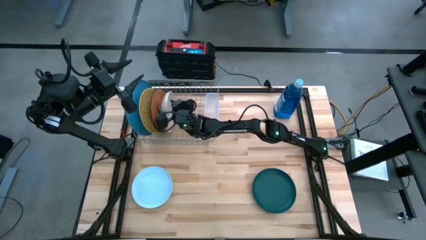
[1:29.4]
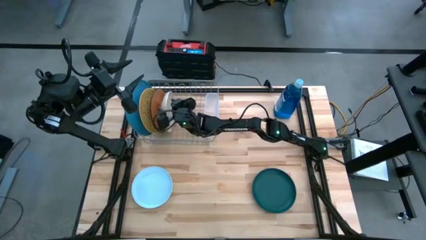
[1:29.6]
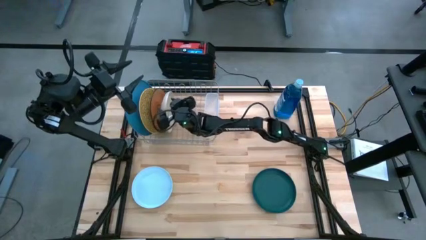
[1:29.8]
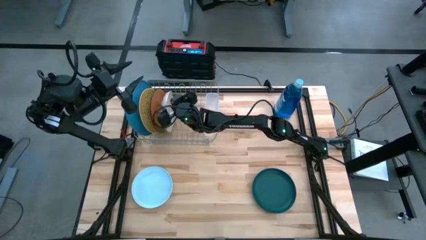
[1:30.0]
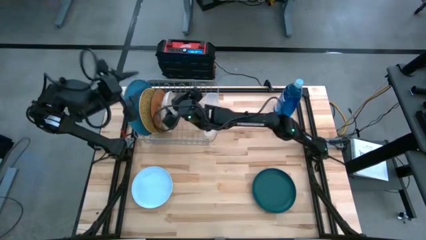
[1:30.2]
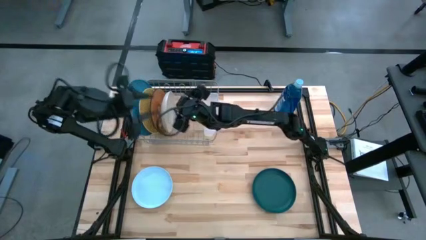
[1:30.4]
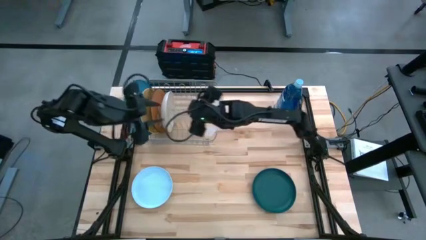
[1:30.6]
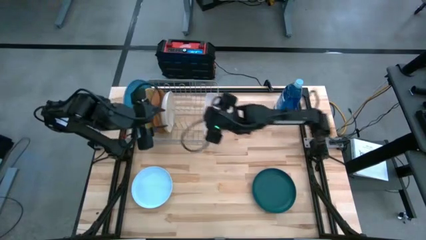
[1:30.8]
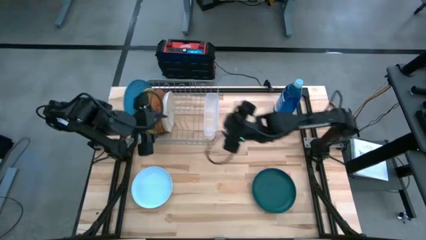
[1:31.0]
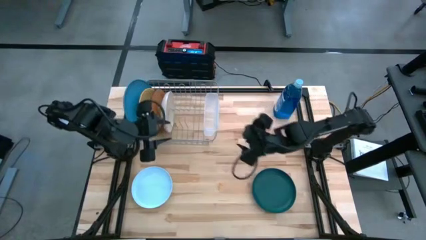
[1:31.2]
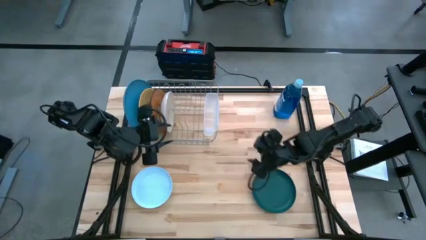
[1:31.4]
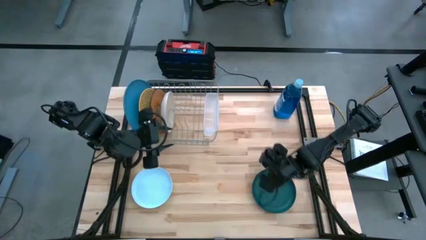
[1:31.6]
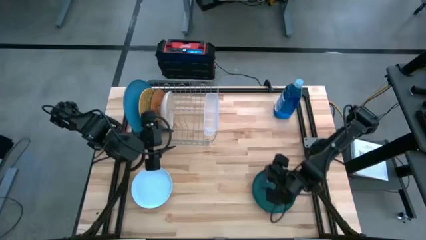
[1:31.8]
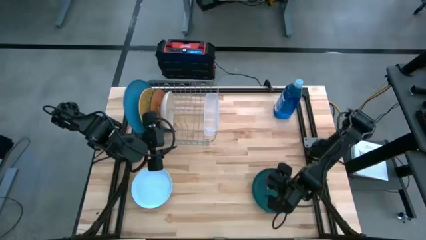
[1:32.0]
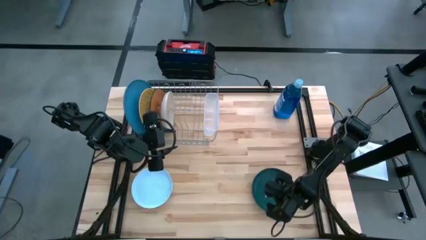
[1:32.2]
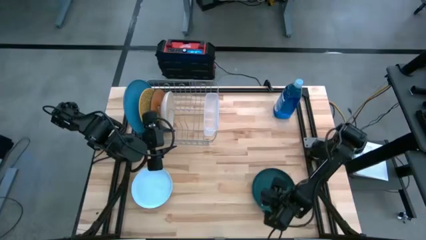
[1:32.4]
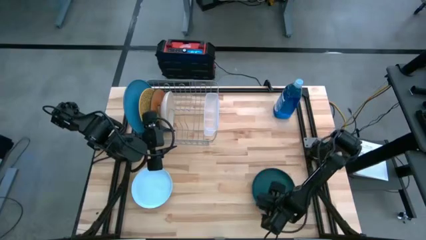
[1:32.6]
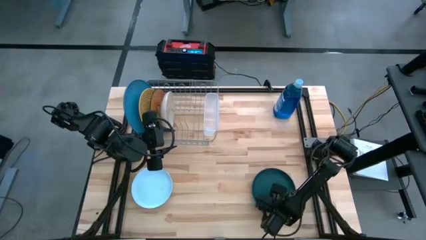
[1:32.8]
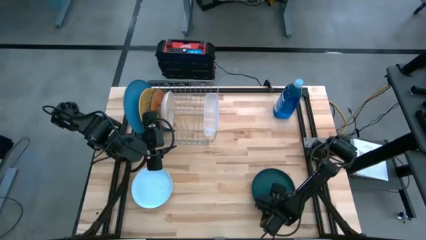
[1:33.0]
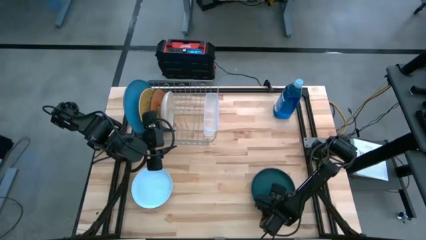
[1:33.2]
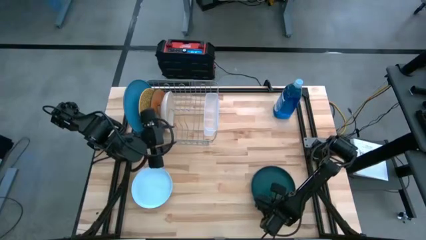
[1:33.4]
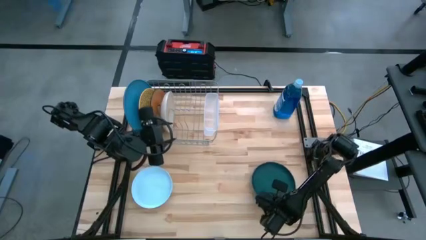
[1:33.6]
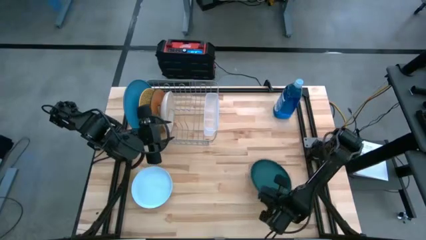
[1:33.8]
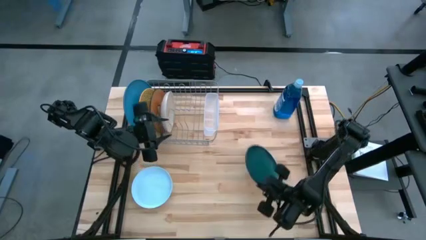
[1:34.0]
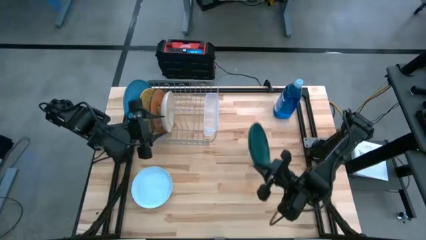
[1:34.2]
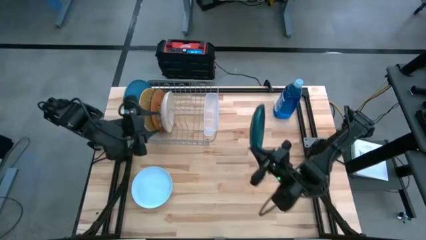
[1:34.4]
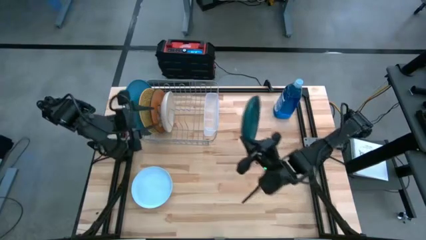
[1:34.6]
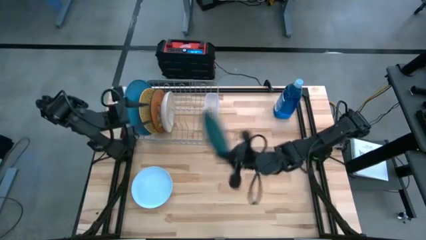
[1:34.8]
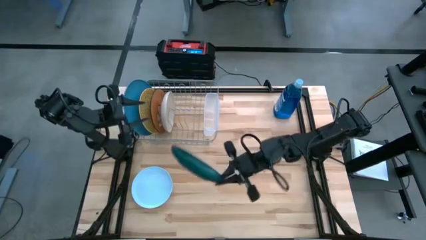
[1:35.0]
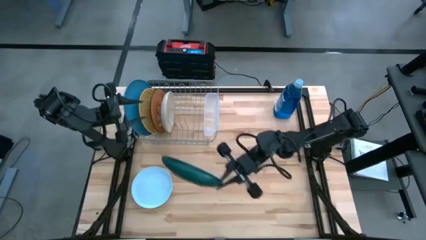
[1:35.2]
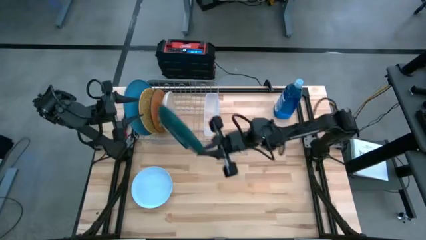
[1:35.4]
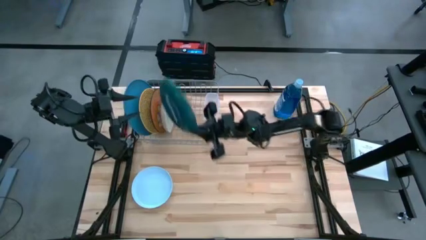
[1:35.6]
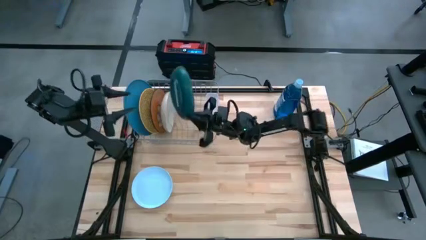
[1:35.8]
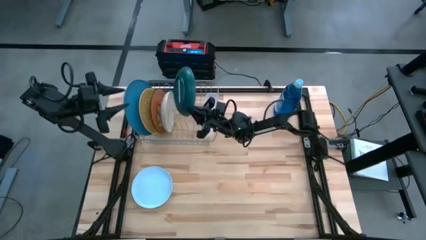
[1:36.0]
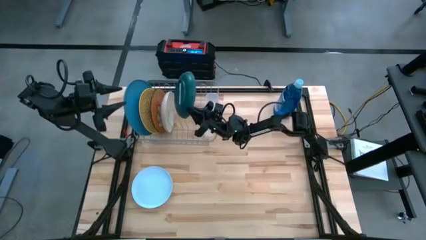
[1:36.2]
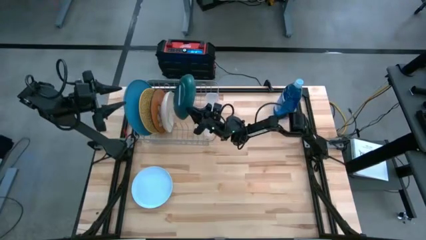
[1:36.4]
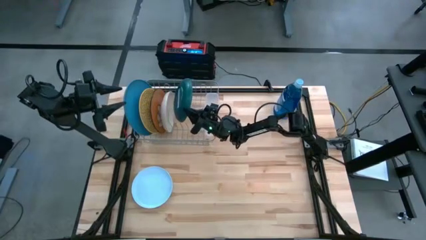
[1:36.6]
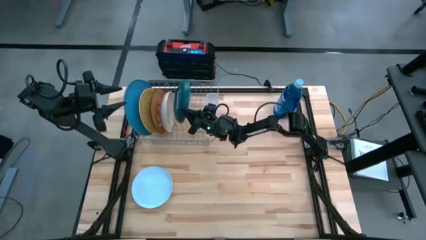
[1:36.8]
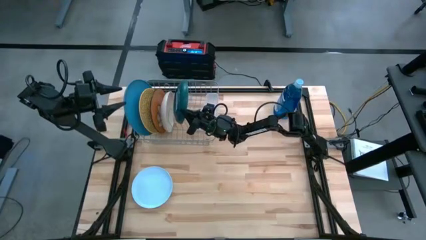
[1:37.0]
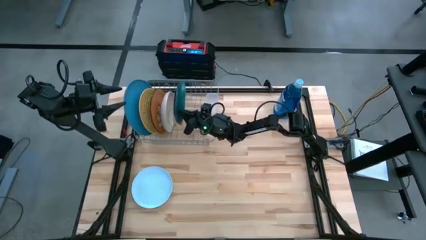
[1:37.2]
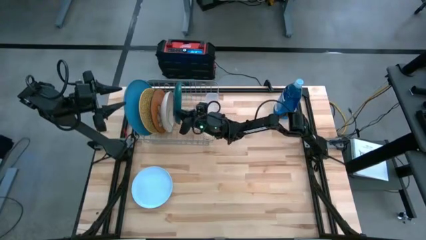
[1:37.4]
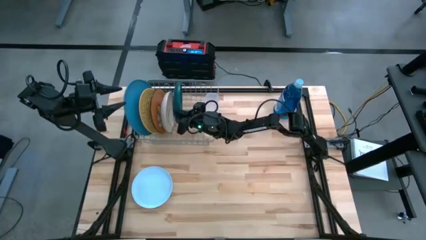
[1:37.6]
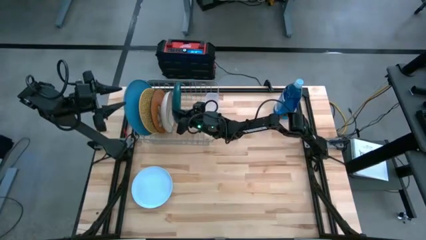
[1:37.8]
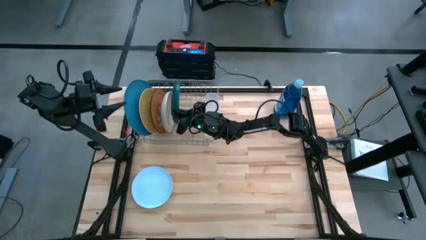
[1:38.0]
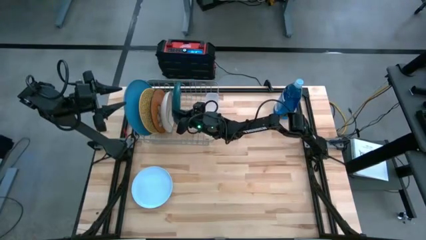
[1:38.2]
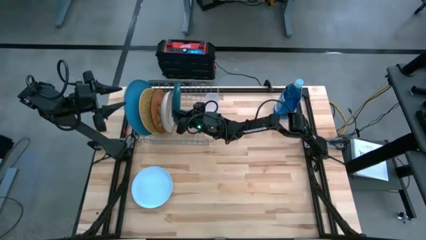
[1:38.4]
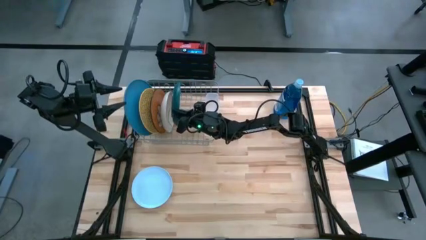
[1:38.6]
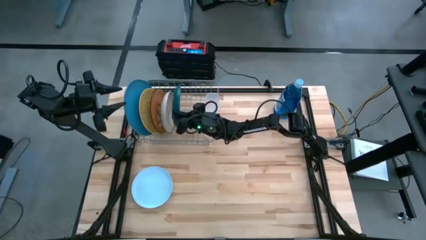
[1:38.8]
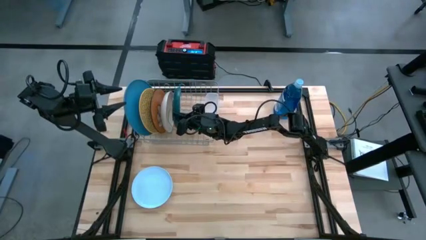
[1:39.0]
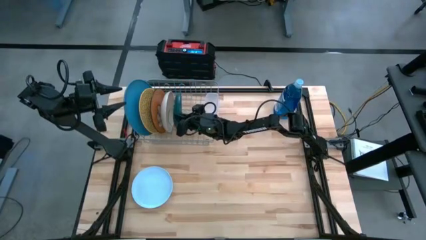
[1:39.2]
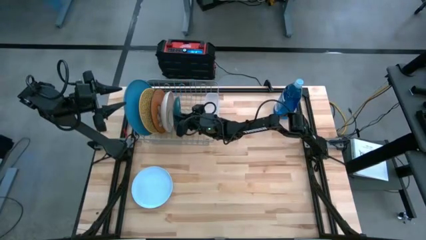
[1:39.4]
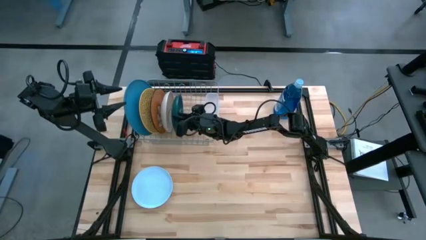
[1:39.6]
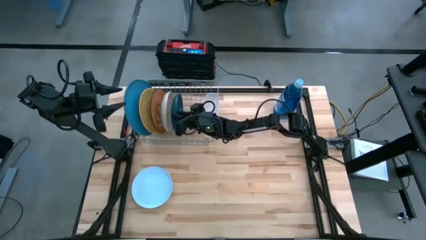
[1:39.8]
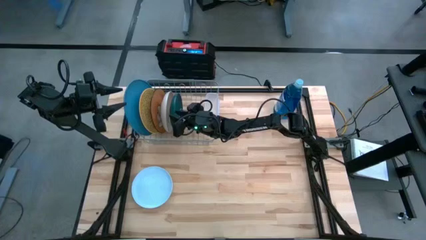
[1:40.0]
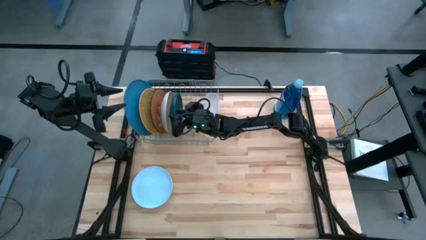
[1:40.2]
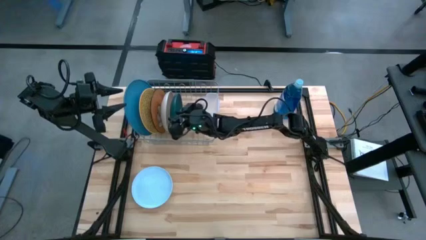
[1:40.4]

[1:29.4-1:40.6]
Task: Sort dishes
Put the green plate in the dish rack

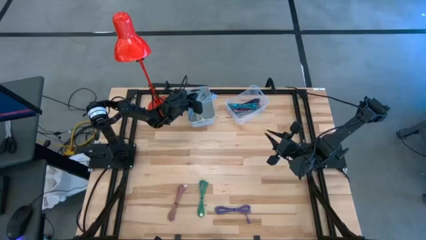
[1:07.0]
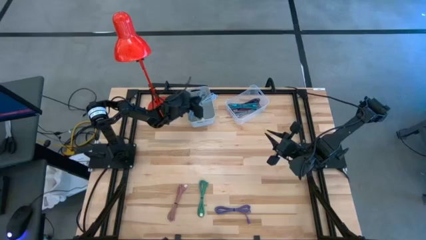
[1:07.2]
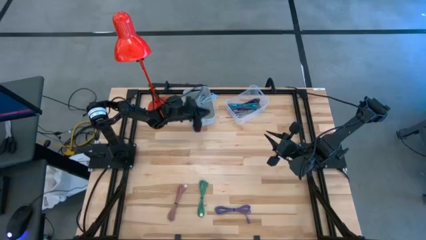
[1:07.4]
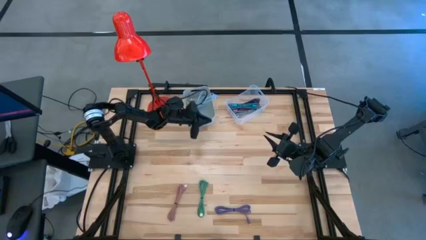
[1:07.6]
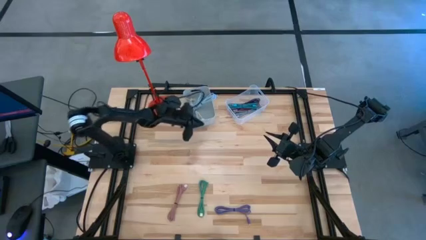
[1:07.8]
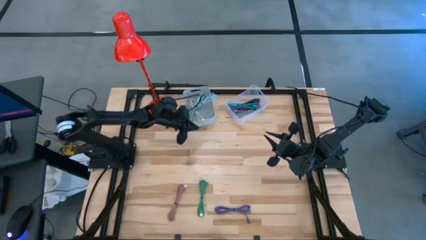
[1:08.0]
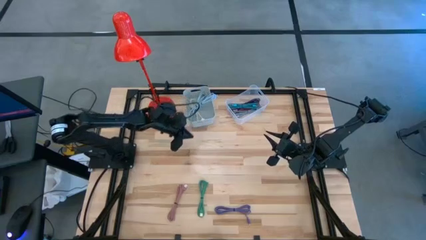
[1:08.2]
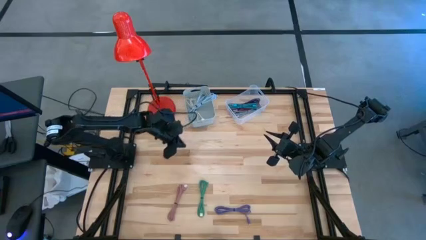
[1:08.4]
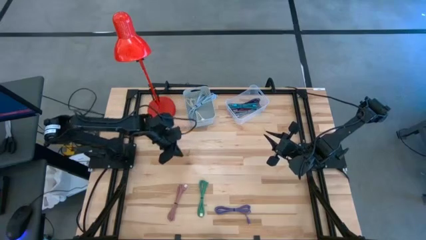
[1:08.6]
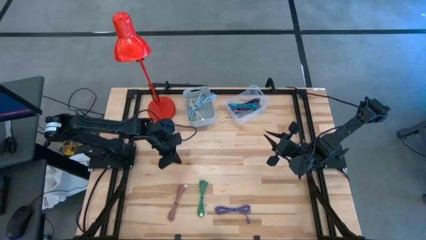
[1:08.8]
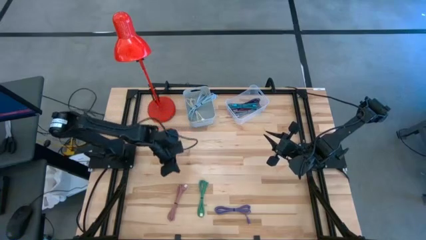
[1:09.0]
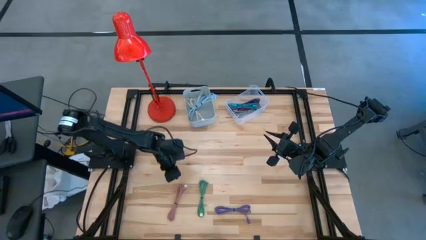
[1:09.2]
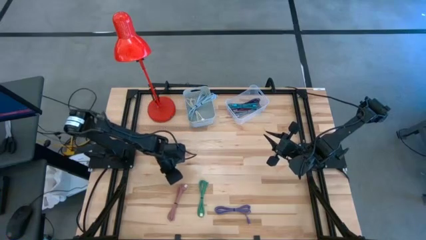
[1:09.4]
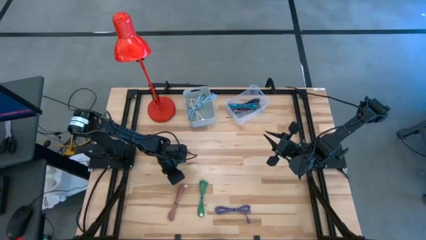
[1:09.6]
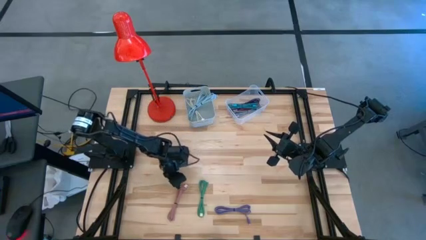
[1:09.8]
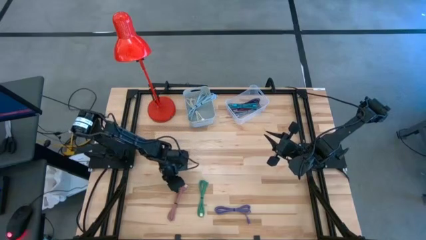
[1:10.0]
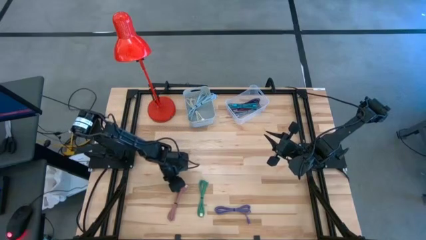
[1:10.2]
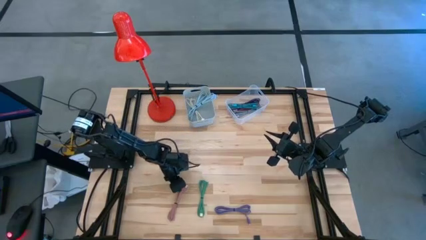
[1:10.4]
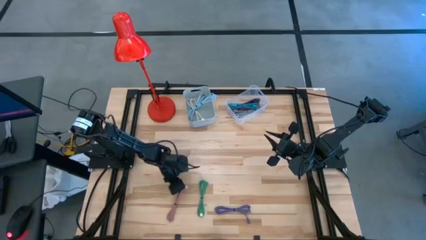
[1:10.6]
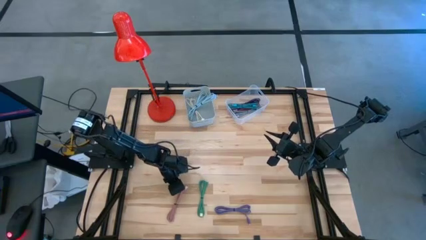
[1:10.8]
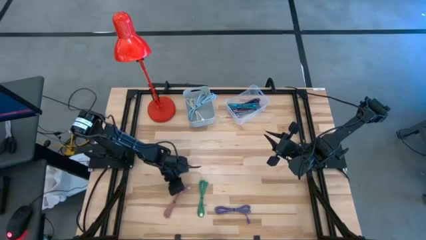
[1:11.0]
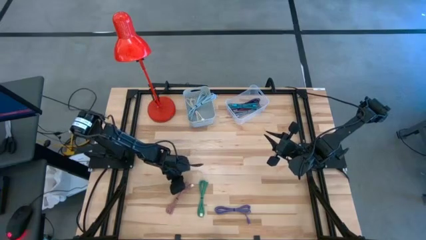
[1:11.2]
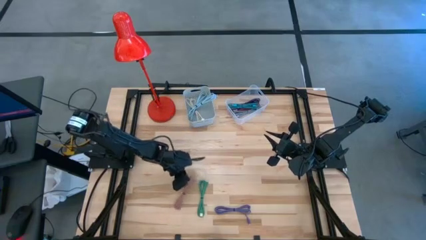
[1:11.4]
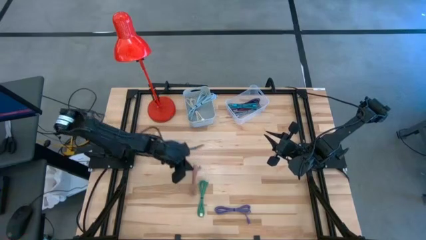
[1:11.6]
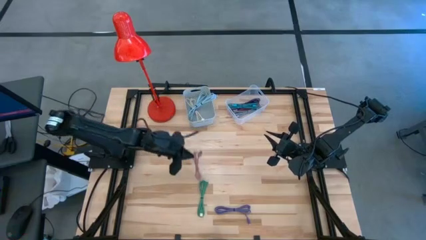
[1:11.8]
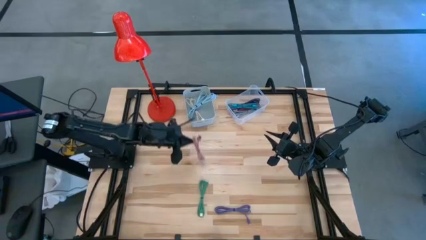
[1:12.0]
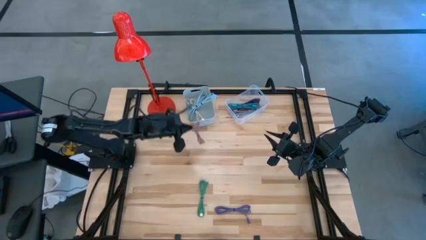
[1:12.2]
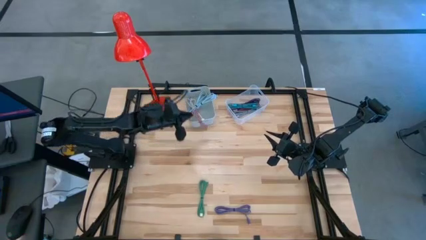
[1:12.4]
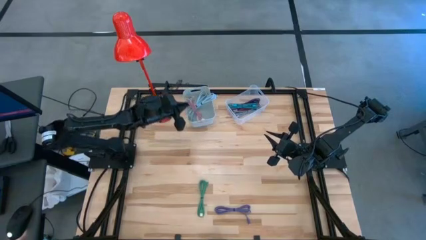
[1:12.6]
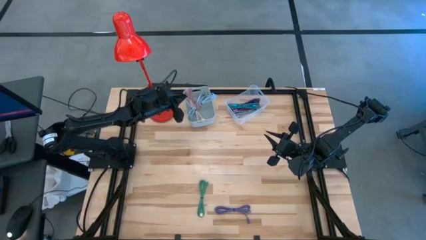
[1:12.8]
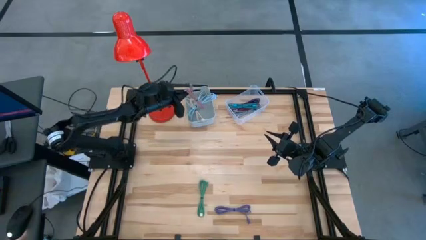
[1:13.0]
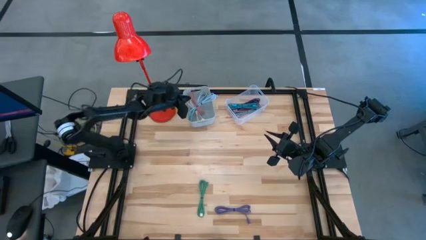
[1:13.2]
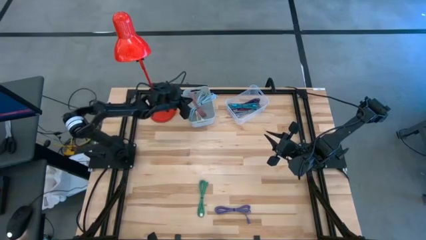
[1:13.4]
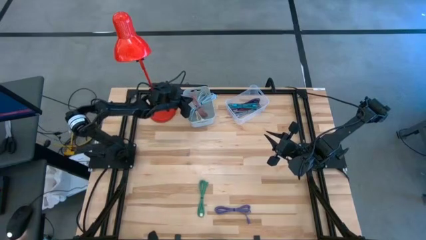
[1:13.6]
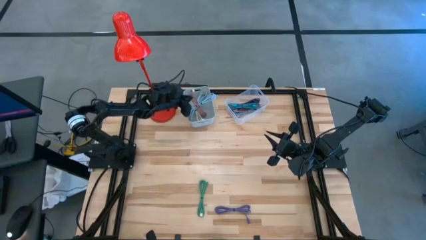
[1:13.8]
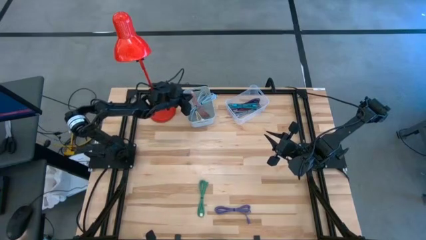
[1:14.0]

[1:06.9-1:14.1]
Task: Pick & Place USB Port
Put the brown charger cable into the gray bin
